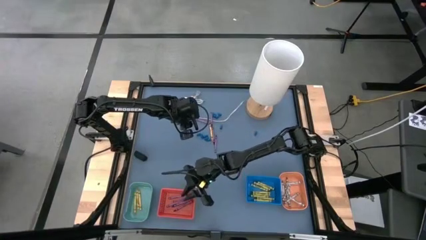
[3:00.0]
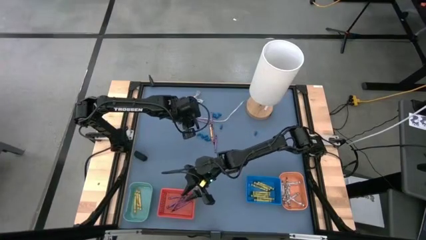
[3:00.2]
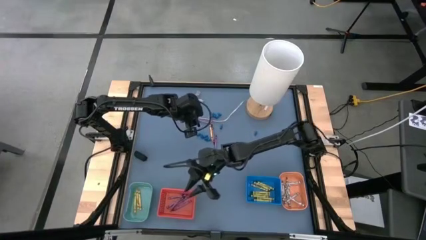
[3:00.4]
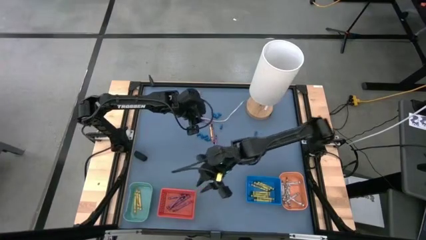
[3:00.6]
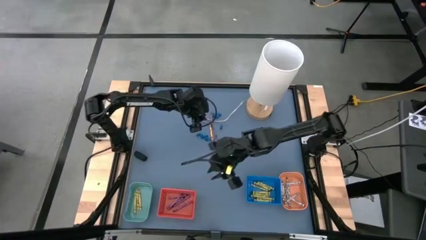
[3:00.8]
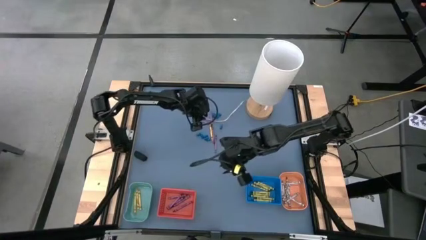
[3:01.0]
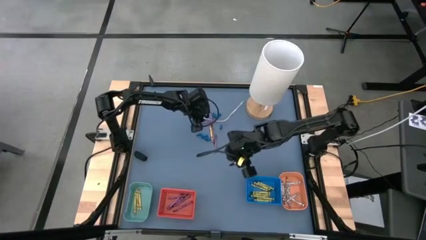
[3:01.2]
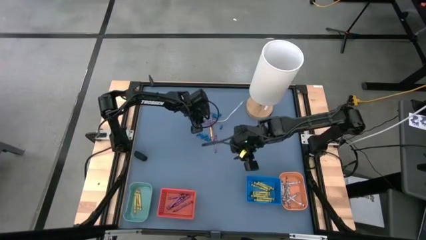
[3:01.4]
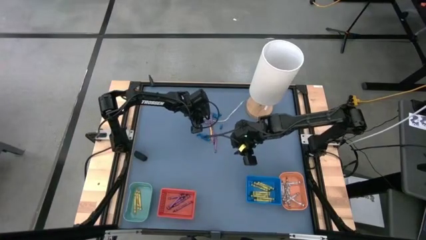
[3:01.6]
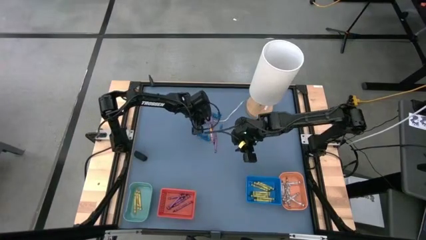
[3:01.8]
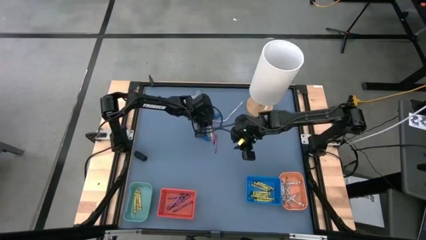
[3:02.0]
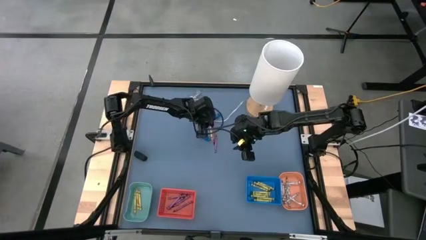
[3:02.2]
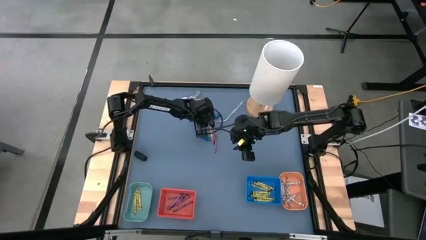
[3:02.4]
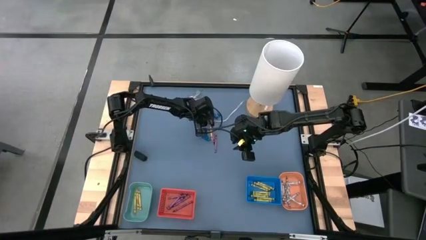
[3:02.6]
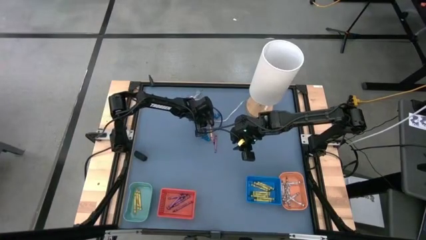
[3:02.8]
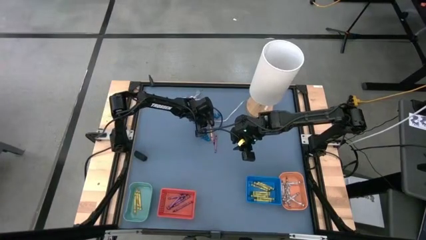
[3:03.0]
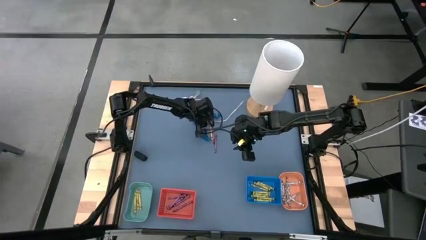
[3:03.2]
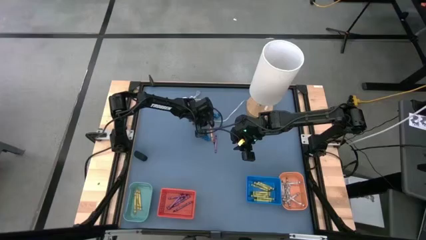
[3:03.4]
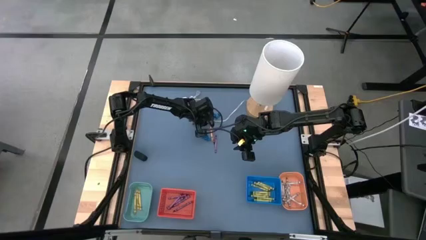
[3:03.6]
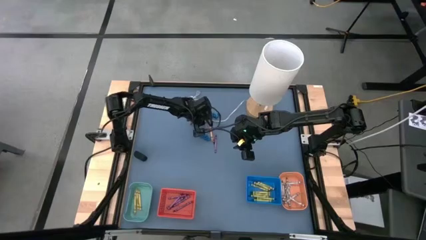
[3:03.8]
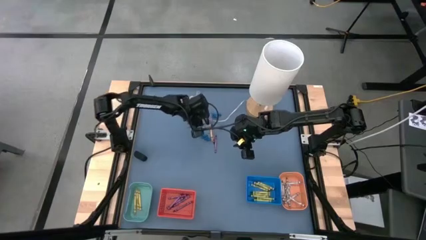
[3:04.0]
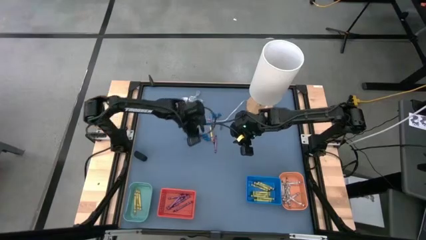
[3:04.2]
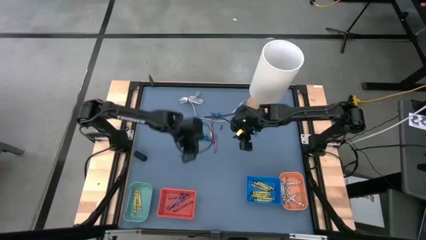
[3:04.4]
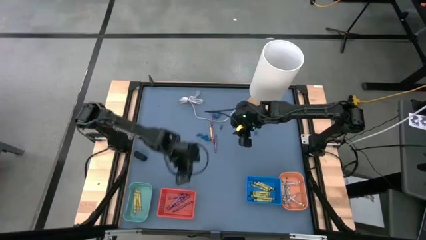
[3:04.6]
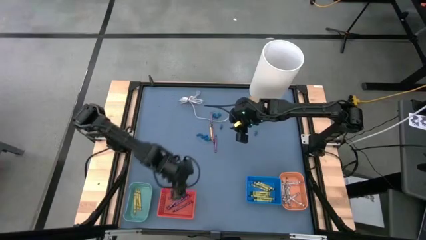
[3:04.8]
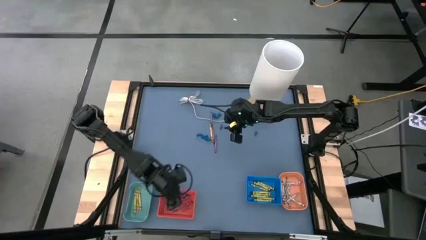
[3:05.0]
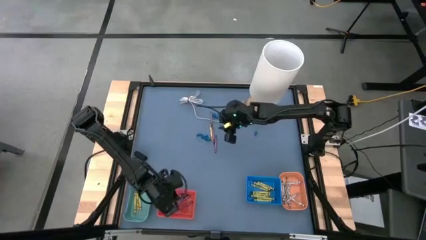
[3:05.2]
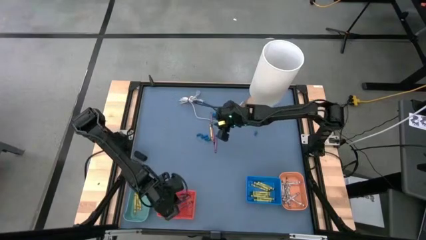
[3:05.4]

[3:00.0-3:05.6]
Task: Sort crayons
Put the red crayon into the red basket

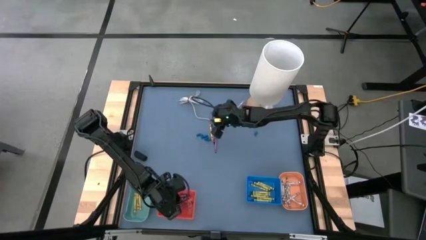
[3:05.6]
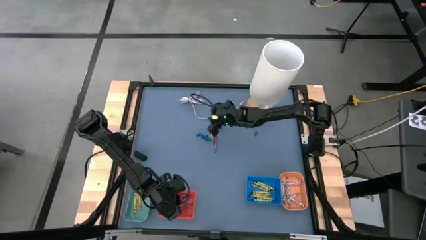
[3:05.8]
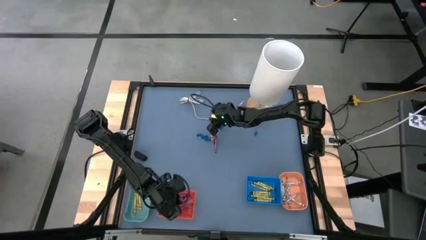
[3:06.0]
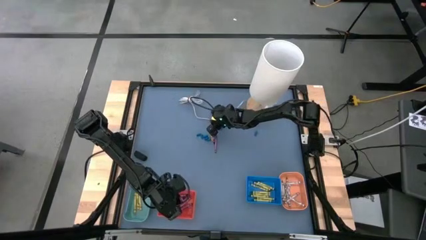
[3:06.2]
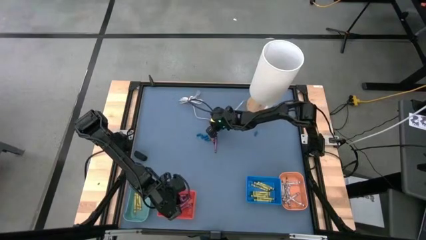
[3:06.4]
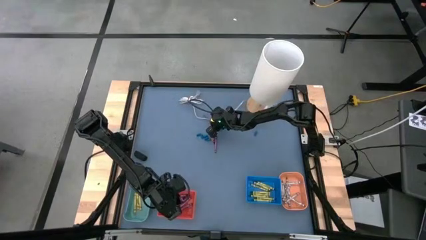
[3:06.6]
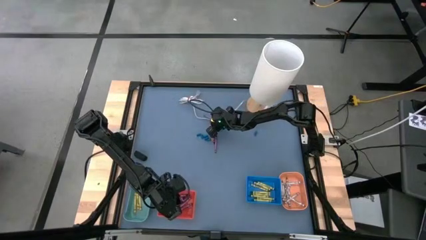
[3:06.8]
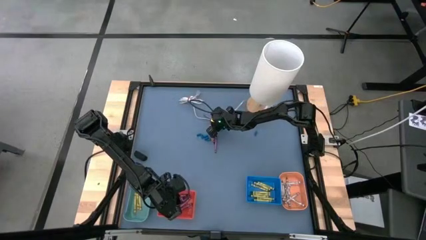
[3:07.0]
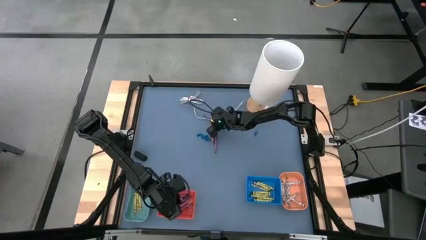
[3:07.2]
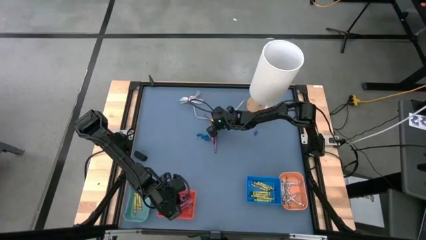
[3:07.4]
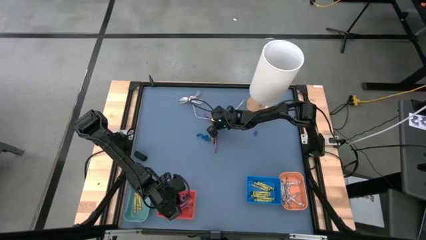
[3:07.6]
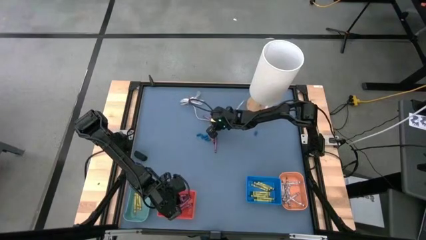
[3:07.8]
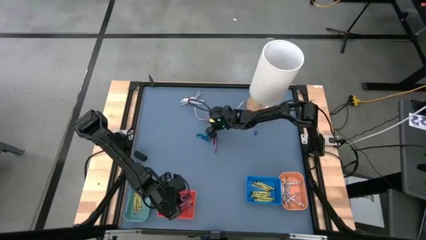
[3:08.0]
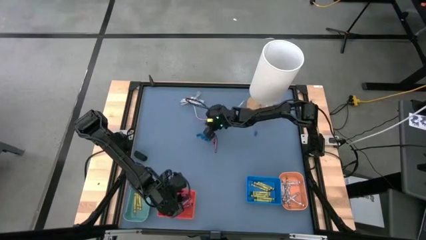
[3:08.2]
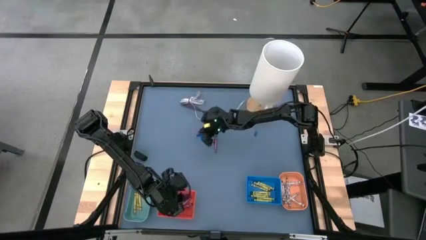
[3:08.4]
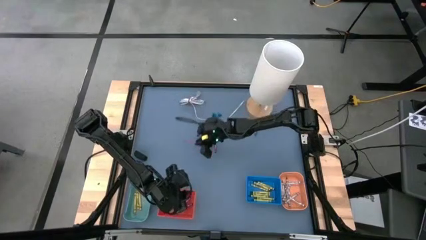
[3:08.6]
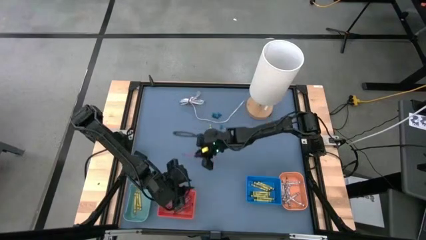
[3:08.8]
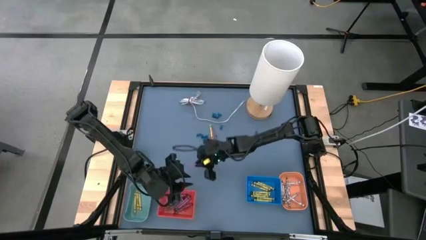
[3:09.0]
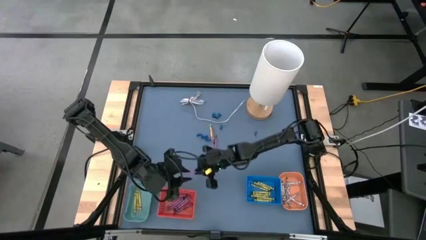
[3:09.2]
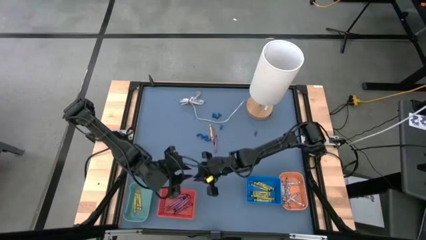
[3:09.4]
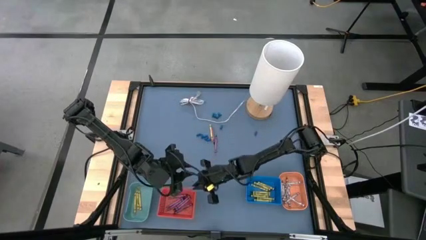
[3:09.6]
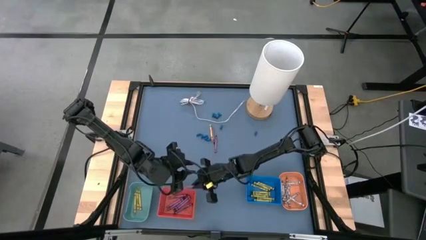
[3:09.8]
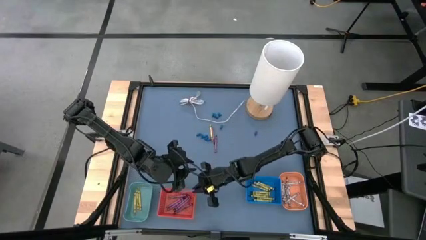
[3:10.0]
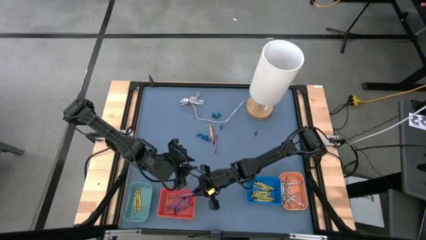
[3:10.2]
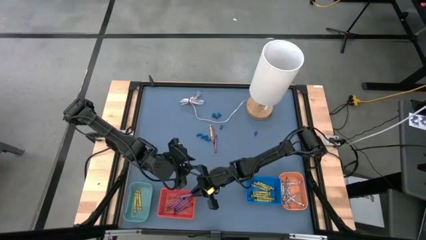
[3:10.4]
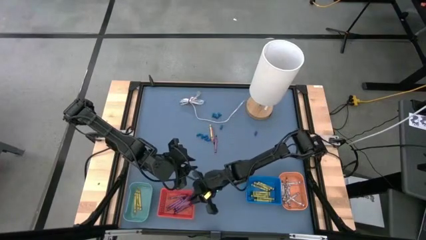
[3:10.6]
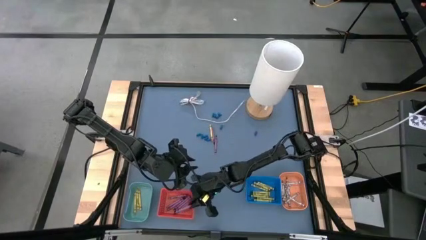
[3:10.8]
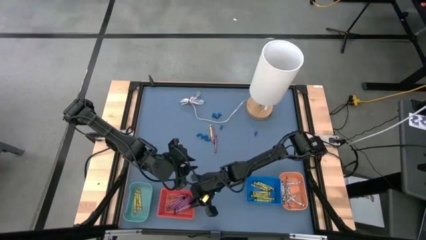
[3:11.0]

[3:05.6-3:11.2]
Put the red crayon into the red basket

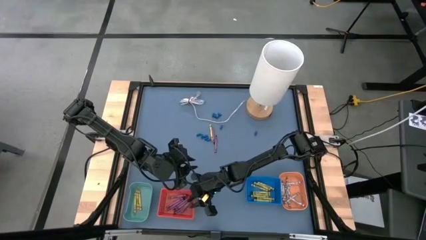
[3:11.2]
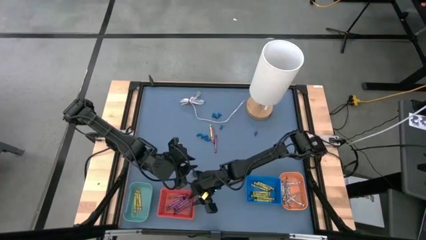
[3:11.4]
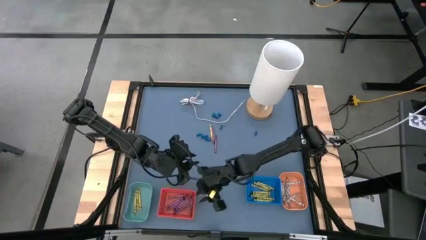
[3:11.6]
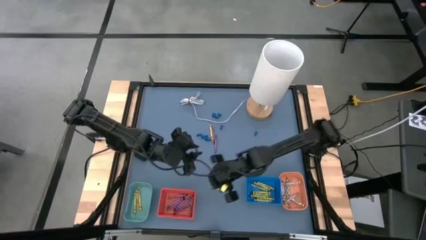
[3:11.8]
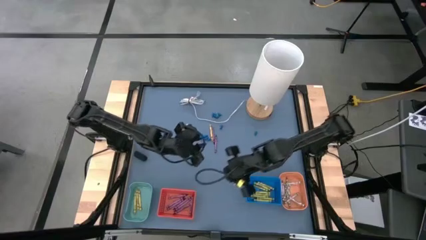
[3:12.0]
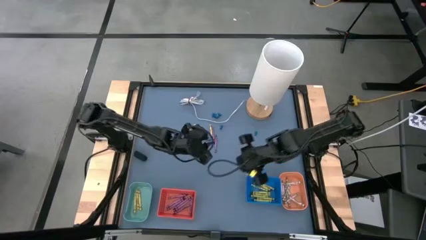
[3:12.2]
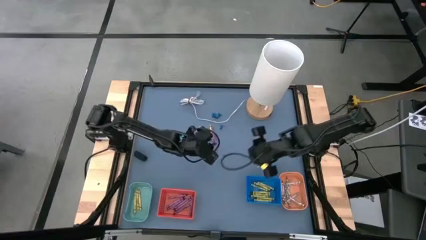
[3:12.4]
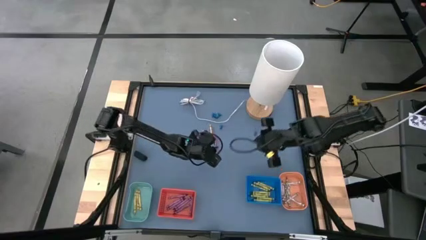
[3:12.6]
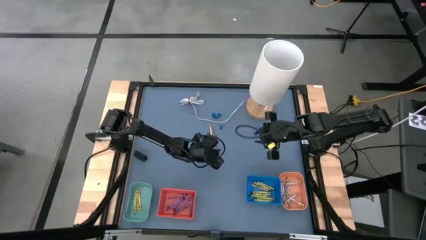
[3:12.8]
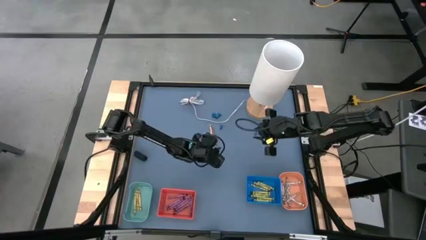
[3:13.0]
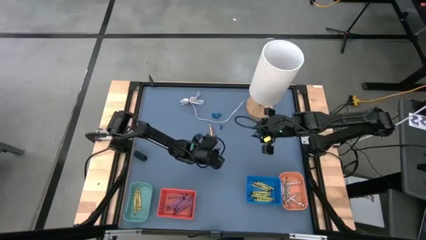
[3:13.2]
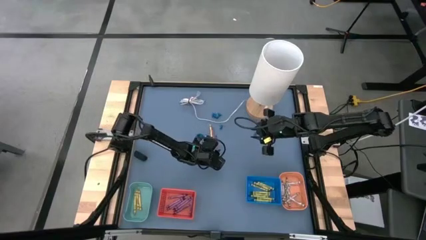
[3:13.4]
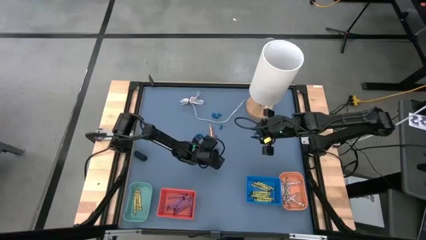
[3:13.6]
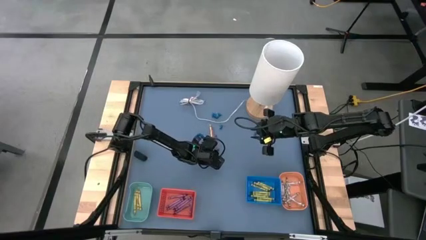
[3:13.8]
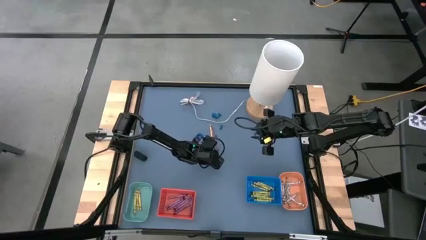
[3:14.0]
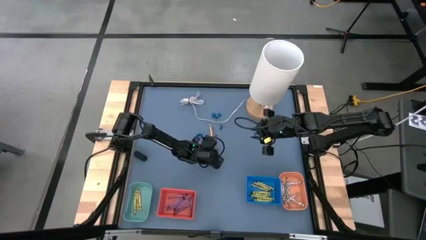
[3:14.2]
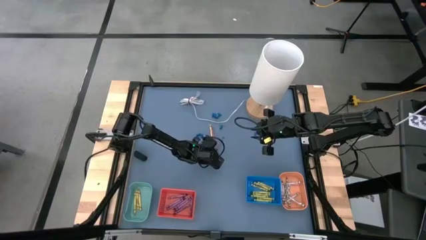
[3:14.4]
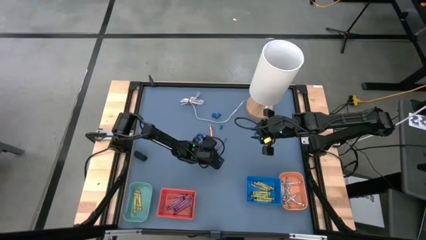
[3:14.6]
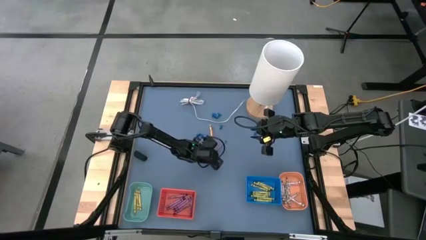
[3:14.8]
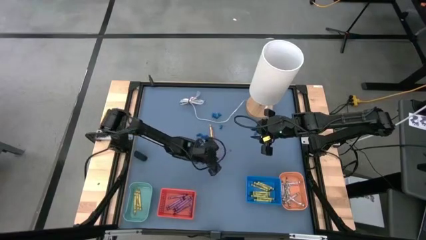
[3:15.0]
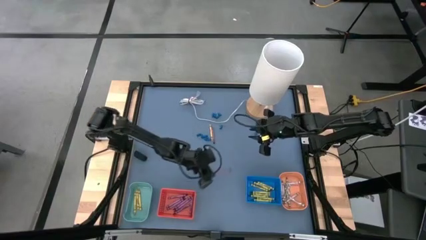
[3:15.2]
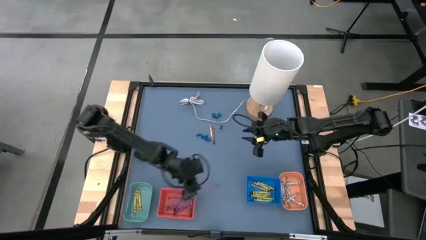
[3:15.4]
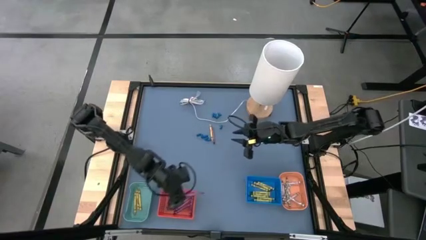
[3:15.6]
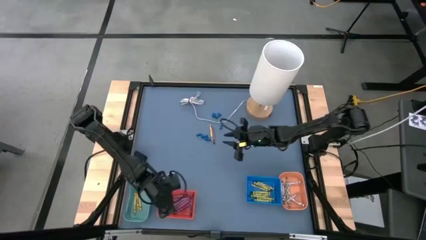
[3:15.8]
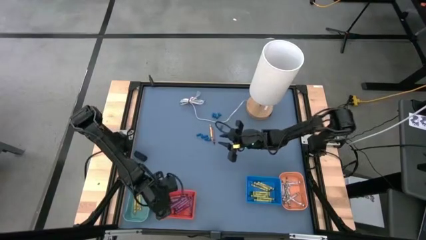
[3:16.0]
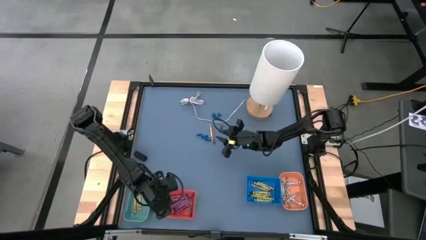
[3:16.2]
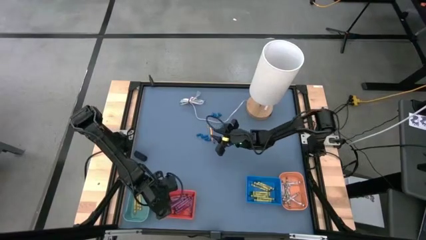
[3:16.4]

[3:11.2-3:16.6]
Put the red crayon into the red basket
